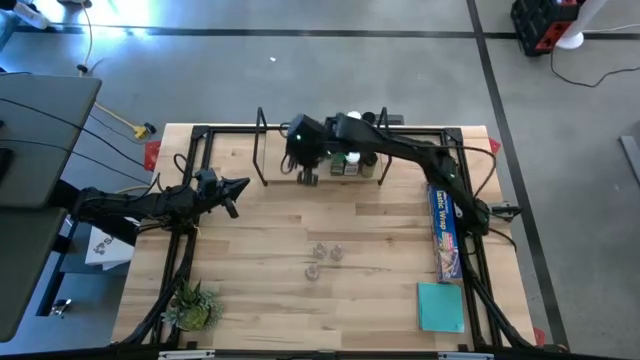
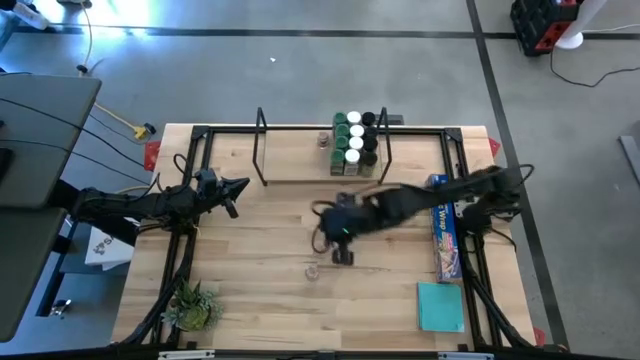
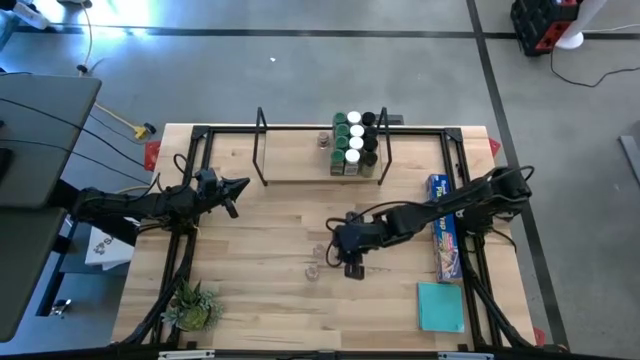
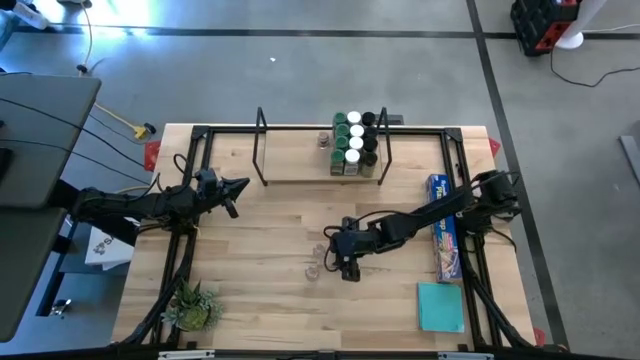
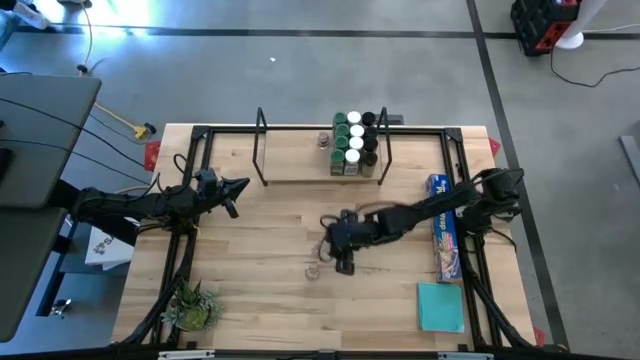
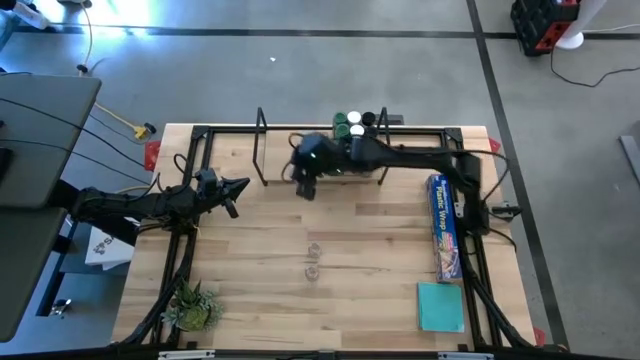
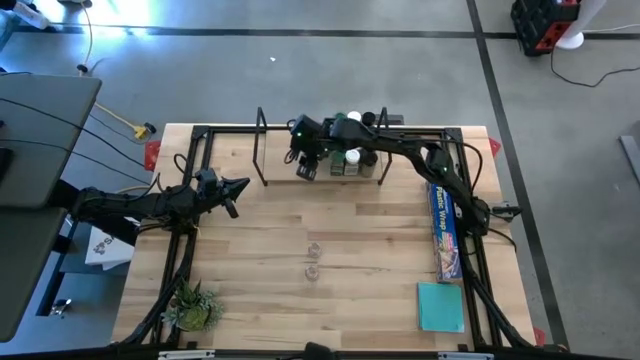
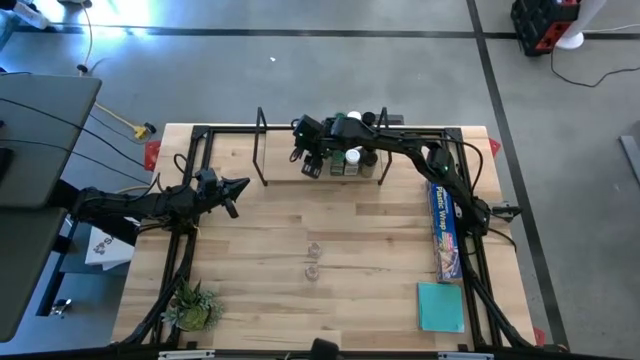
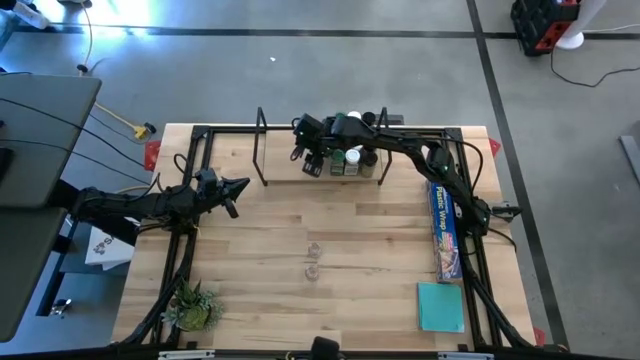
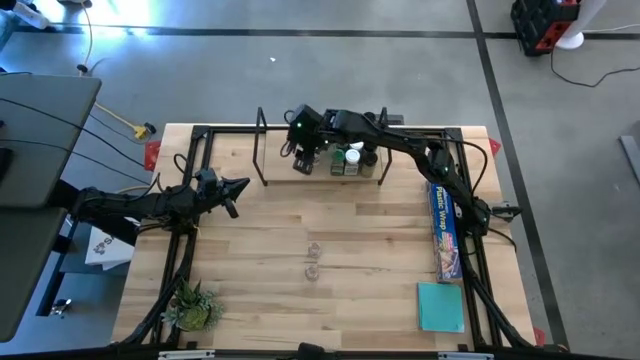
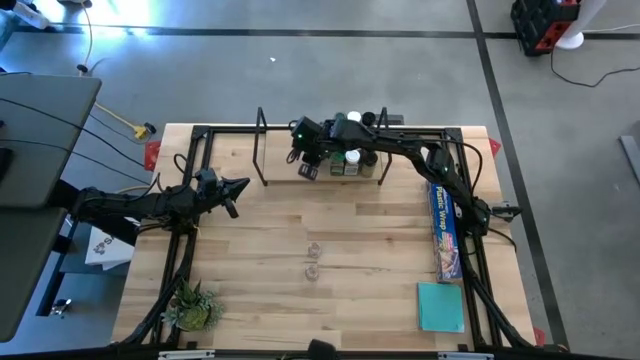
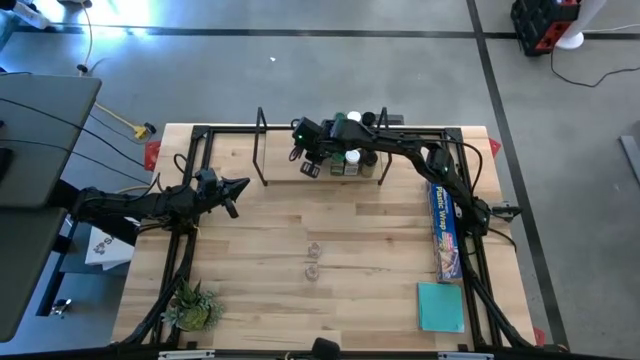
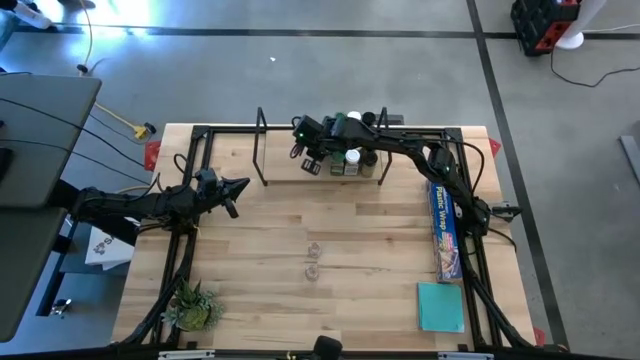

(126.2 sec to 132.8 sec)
Task: Shelf spices
Put the top right brown seasoning bottle on the shelf and align with the other brown seasoning bottle

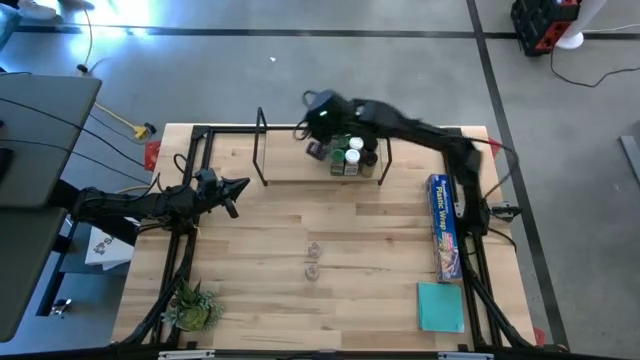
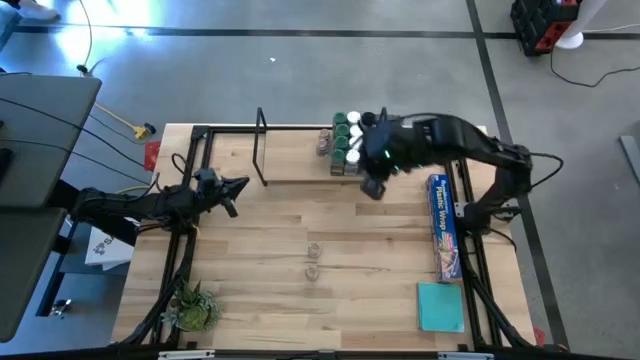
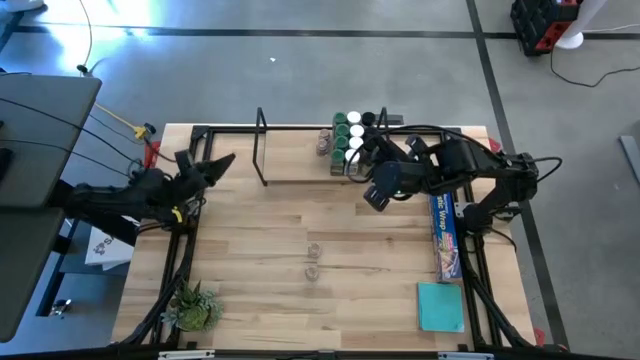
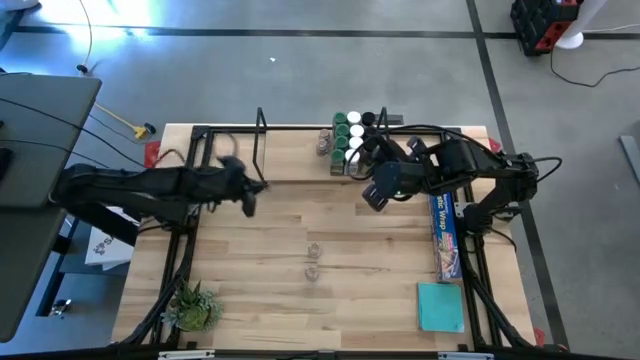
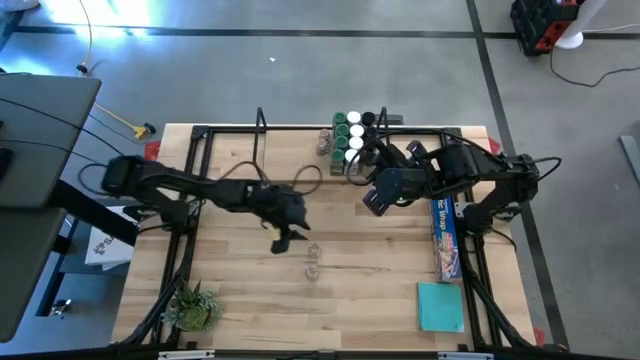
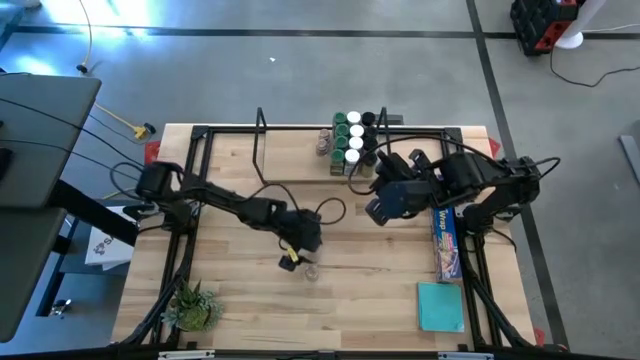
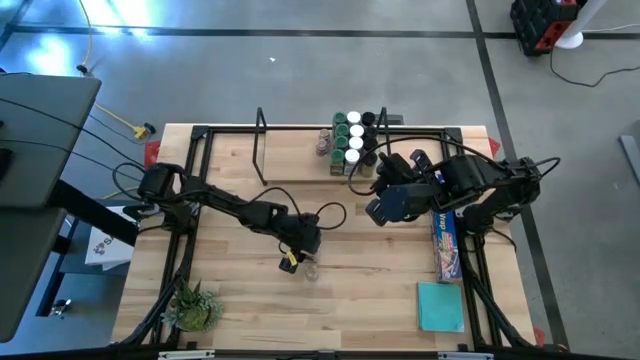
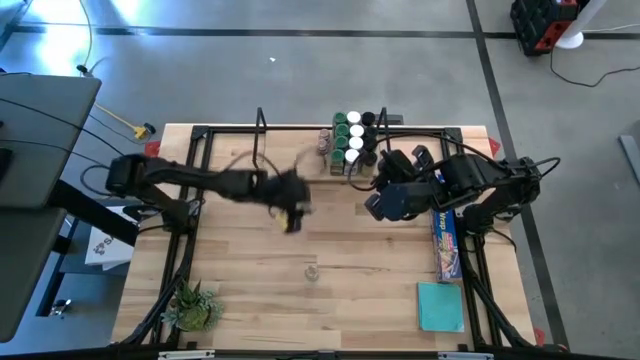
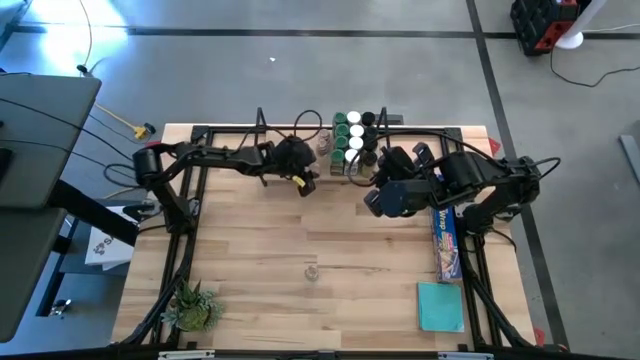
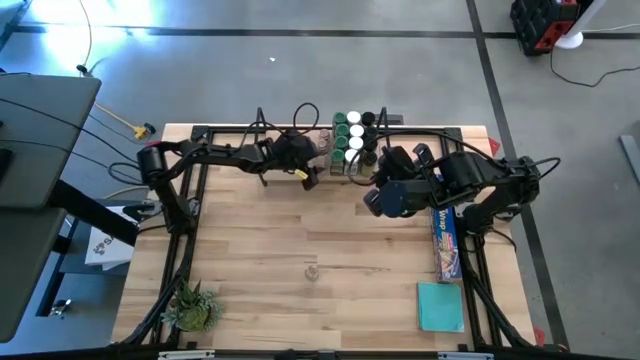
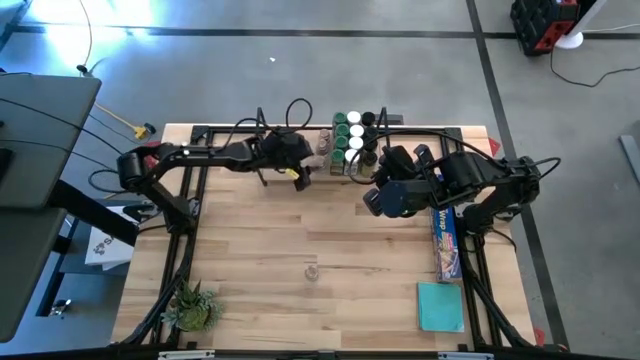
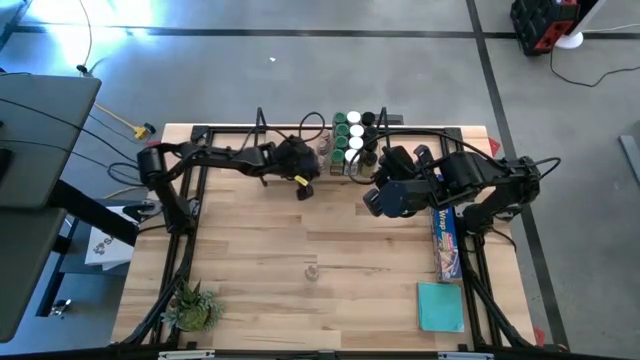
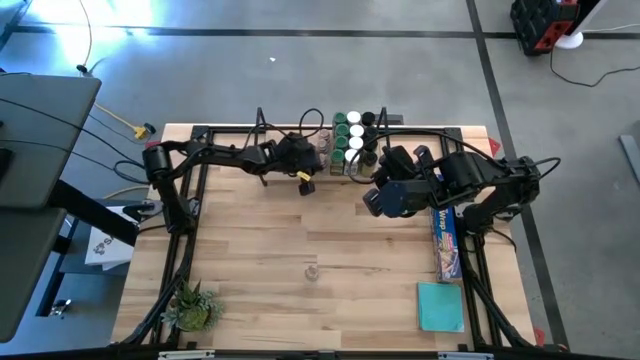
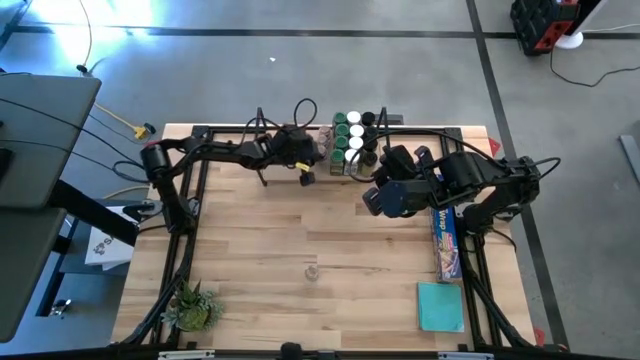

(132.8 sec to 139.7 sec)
Put the top brown seasoning bottle on the shelf and align with the other brown seasoning bottles

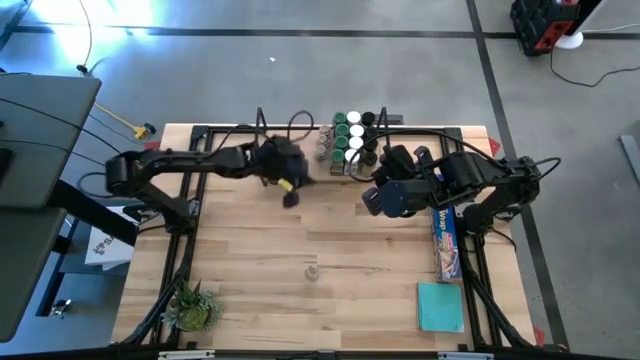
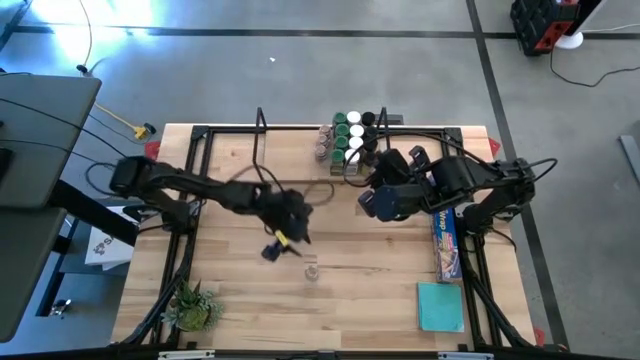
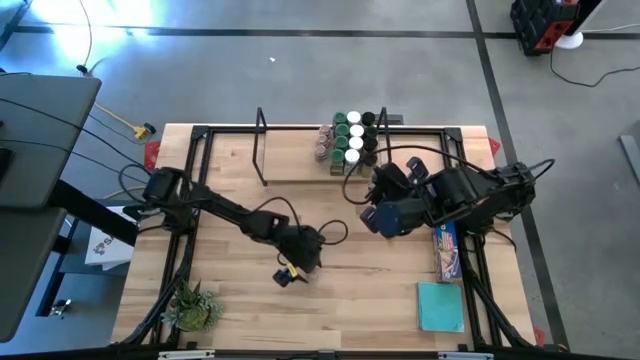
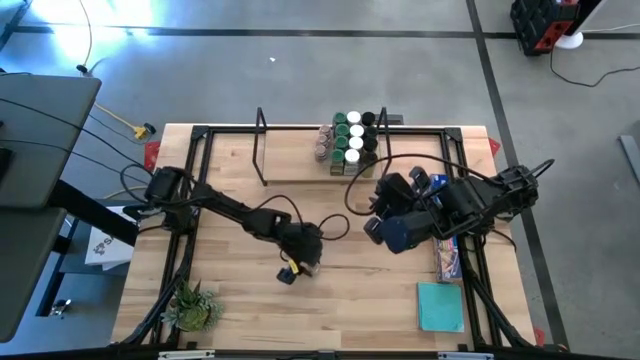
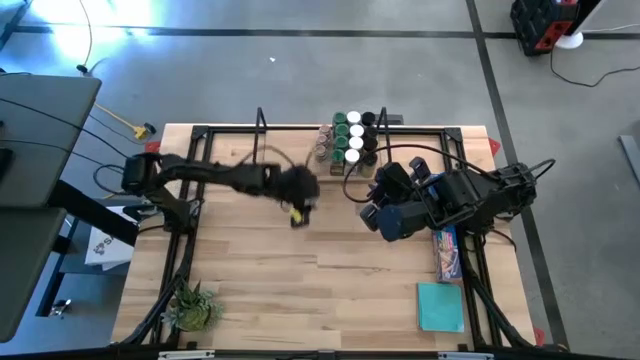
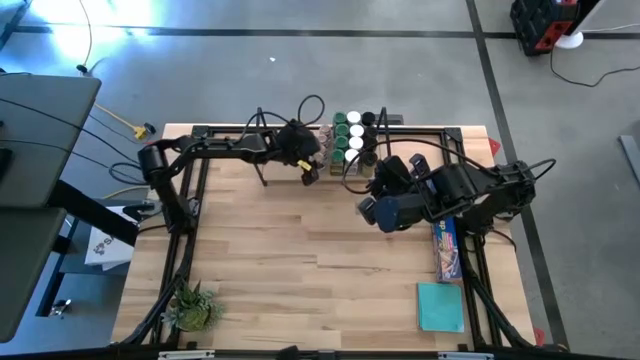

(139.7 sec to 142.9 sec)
Put the brown seasoning bottle on the shelf and align with the other brown seasoning bottles

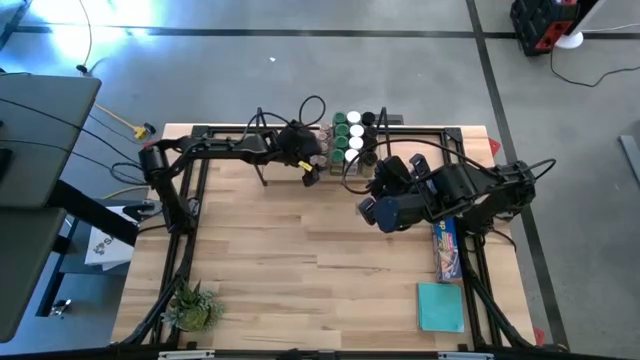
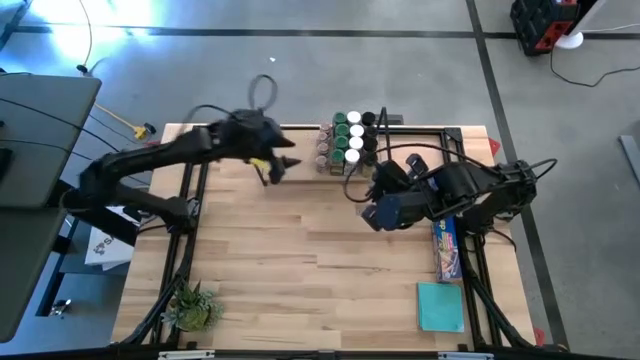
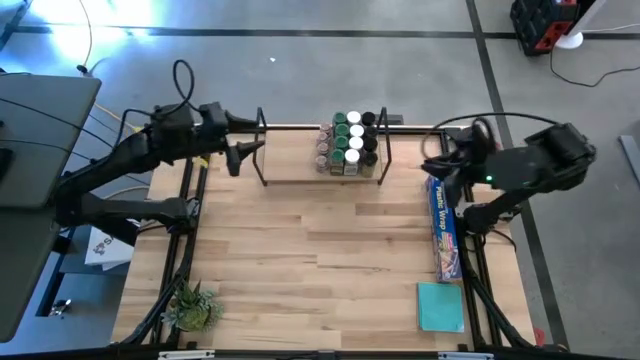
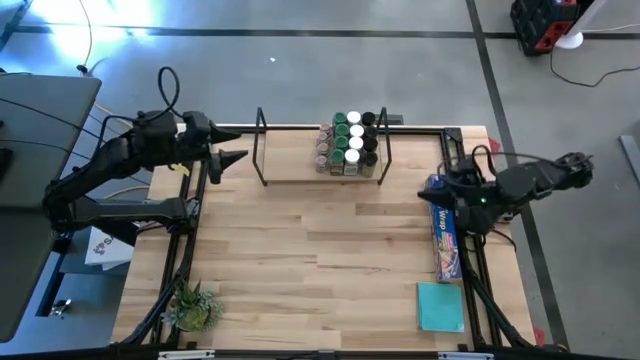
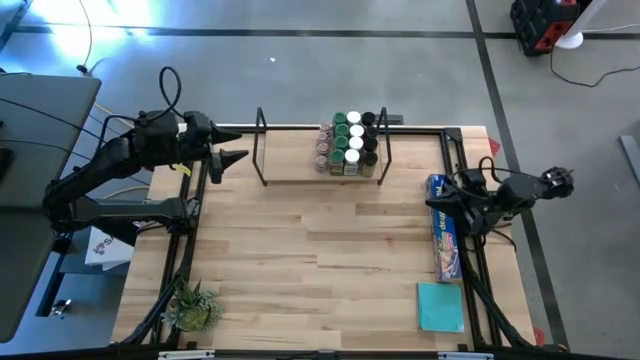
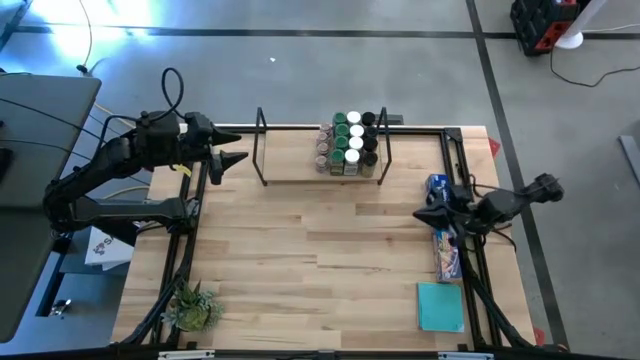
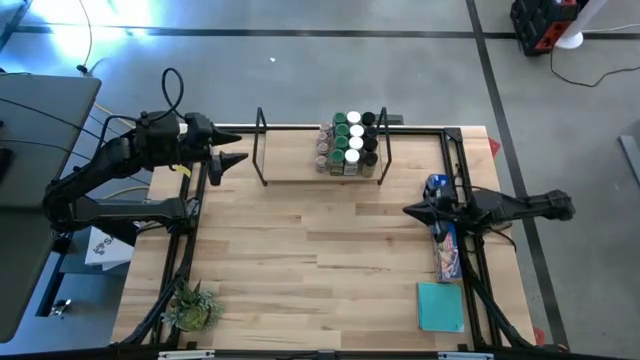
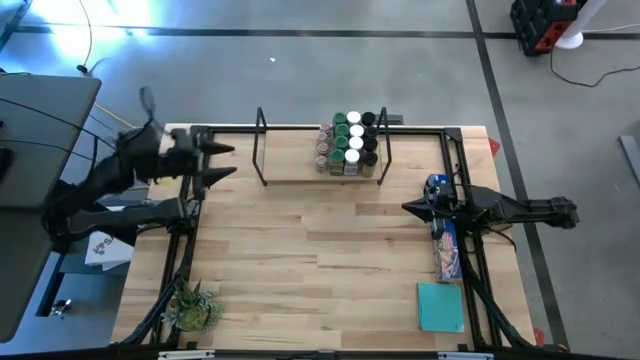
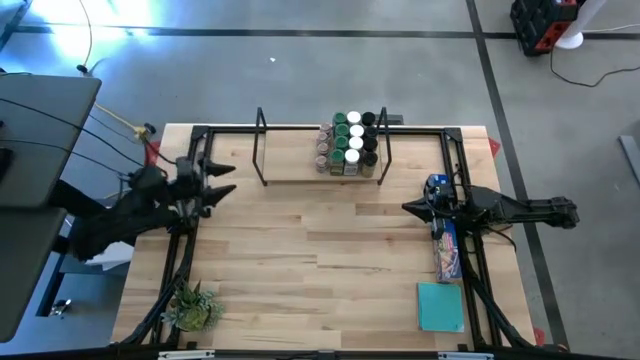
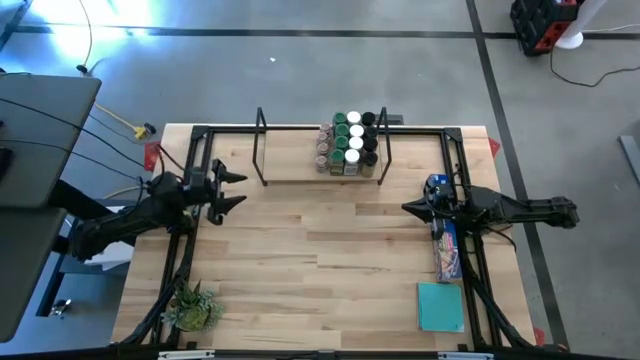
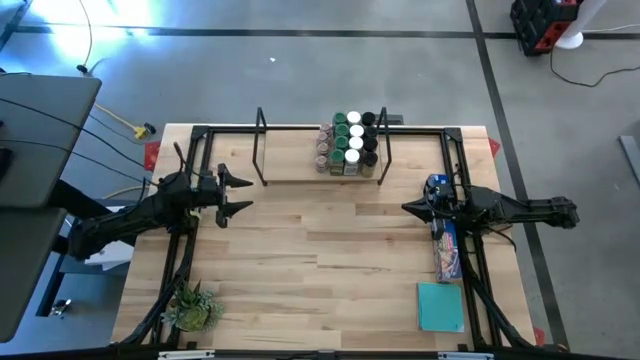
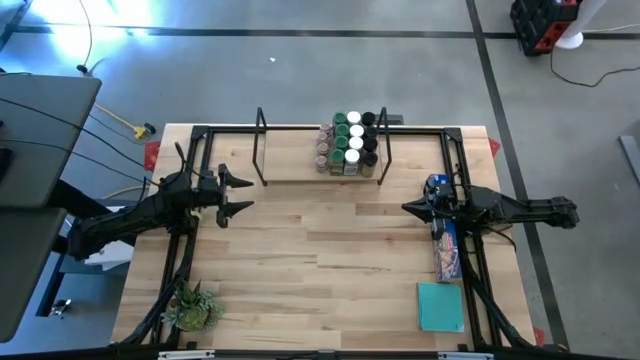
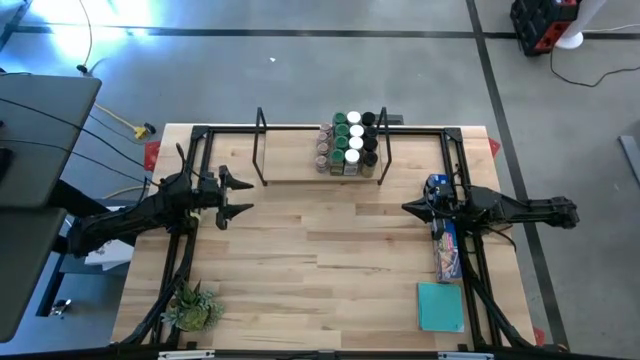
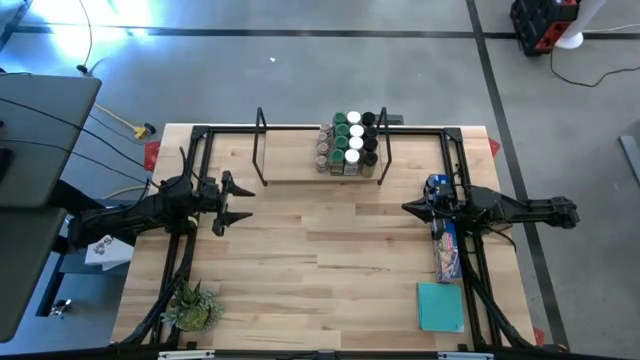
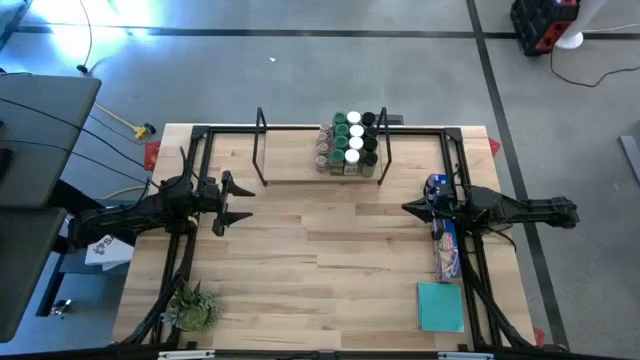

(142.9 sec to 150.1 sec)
Return to Home Position
